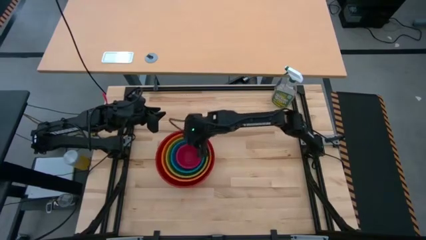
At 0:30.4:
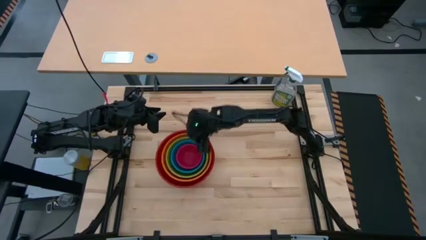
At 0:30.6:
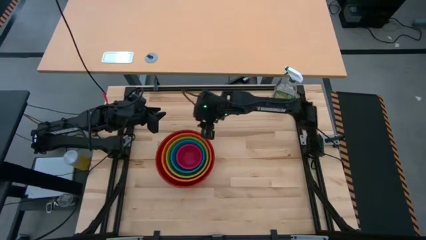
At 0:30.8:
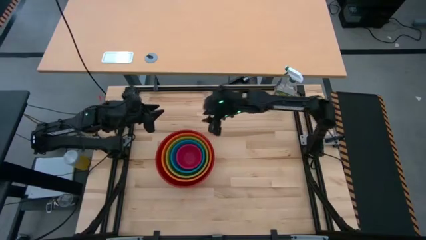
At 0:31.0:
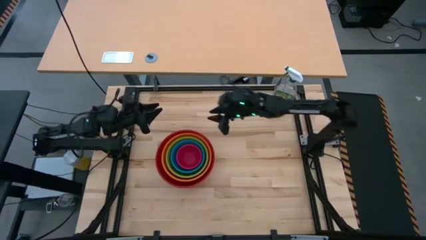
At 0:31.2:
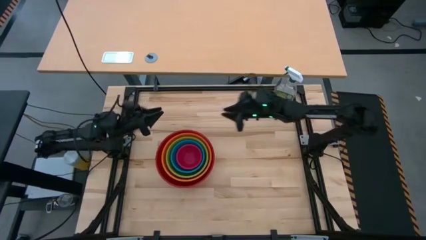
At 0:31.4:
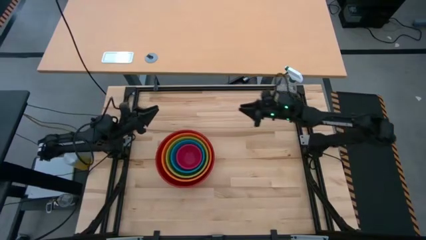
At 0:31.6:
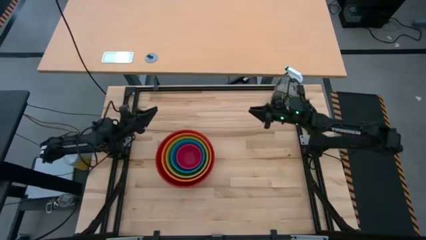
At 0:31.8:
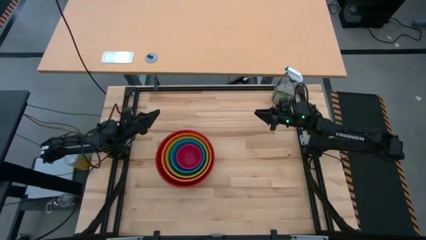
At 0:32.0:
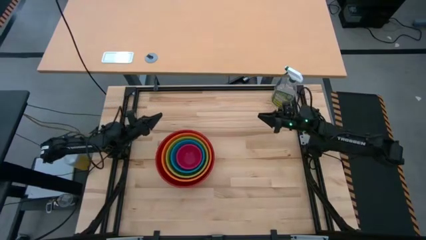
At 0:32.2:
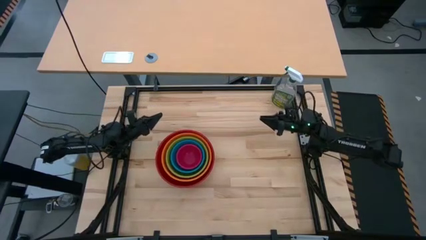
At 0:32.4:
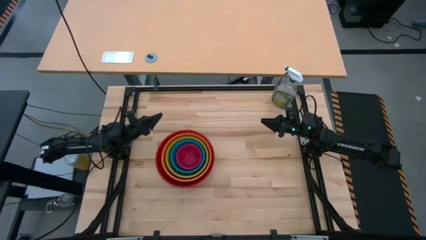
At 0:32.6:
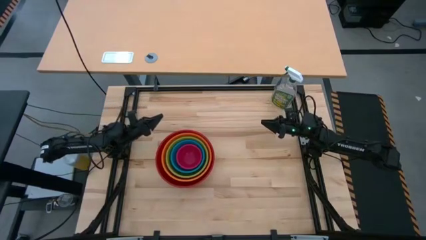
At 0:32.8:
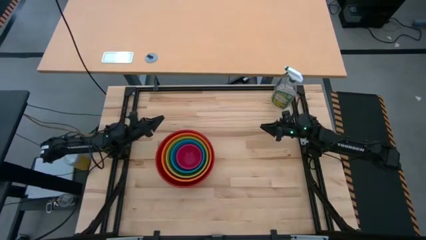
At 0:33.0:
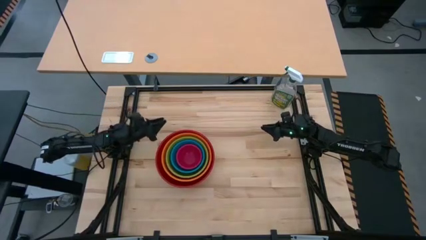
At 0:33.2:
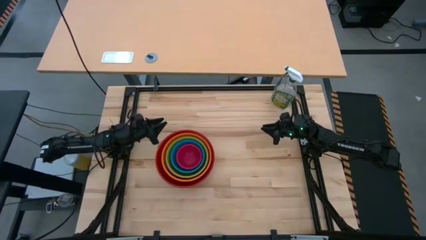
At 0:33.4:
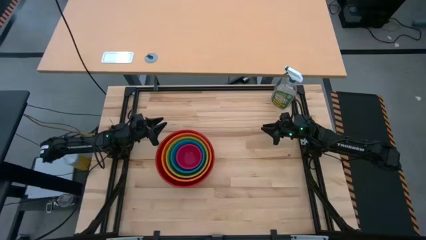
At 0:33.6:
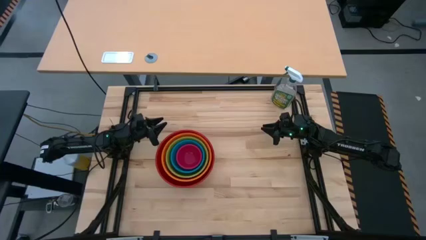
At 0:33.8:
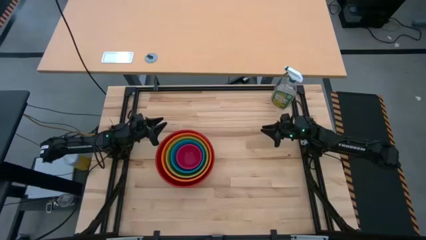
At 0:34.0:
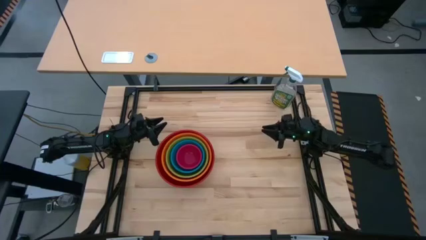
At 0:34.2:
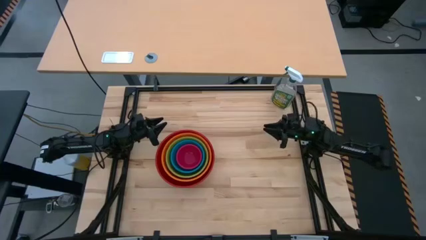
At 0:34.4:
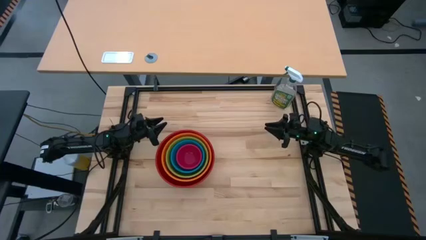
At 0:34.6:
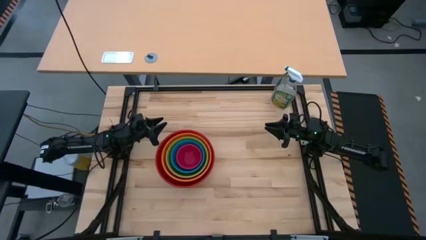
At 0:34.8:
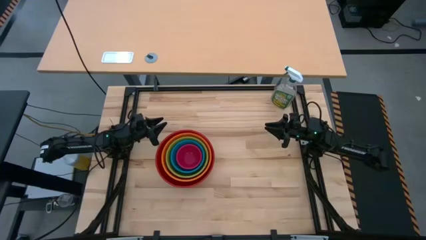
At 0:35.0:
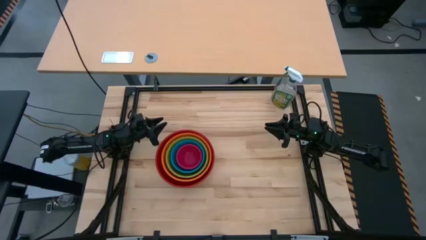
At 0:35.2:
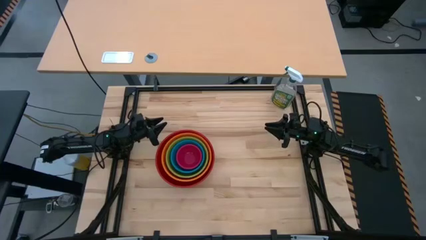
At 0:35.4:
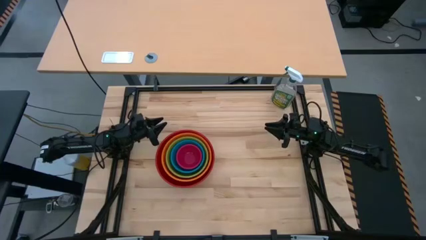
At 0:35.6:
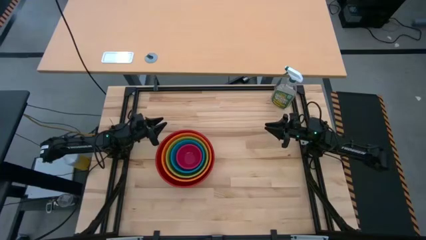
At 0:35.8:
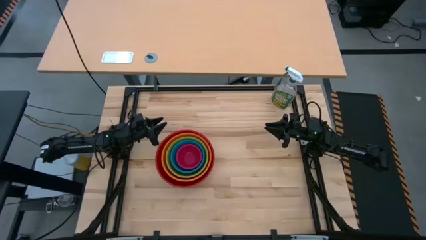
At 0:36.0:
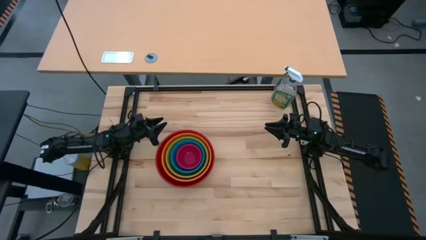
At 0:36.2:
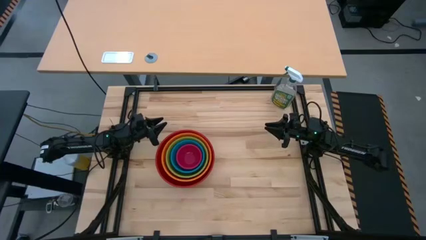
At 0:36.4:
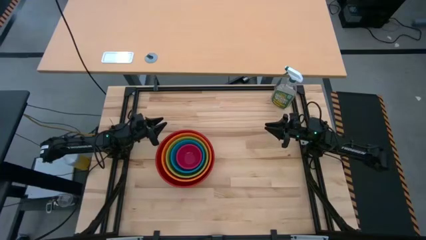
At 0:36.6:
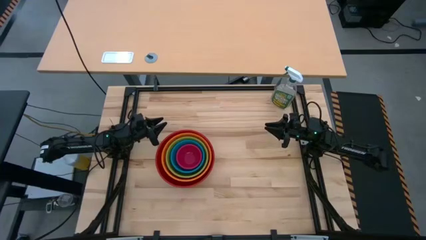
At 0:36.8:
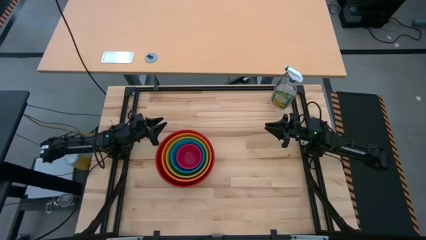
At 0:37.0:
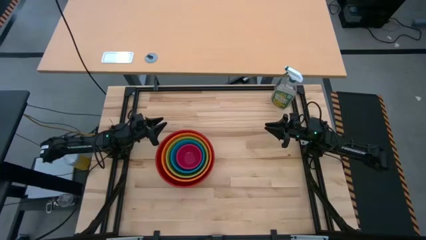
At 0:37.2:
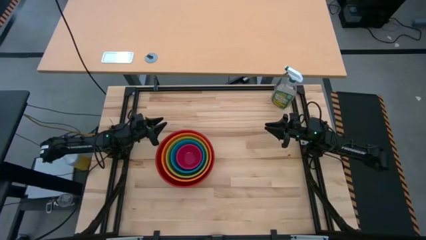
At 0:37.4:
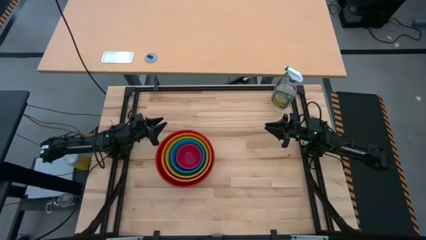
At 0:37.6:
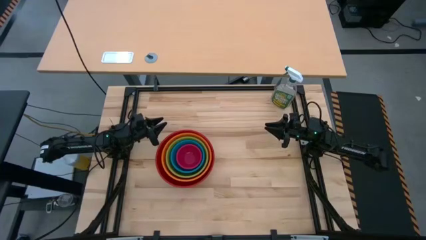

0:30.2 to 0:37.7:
Return to Home Position

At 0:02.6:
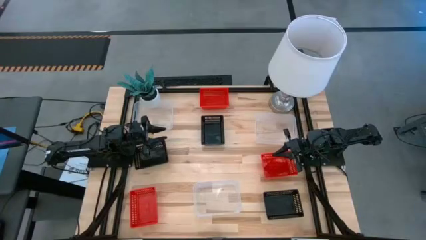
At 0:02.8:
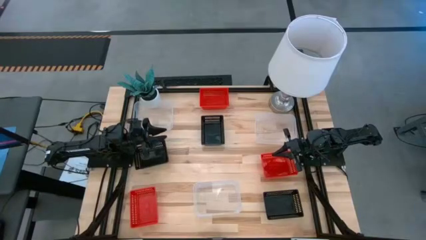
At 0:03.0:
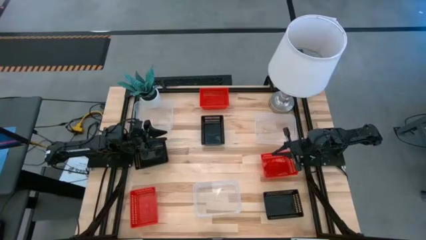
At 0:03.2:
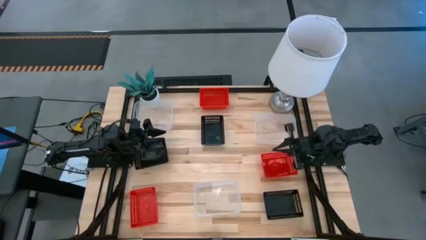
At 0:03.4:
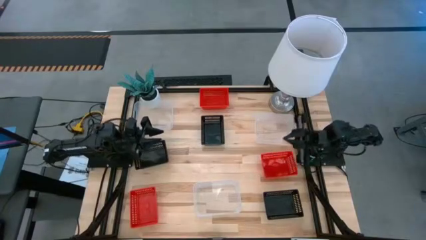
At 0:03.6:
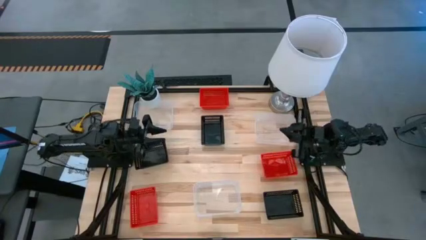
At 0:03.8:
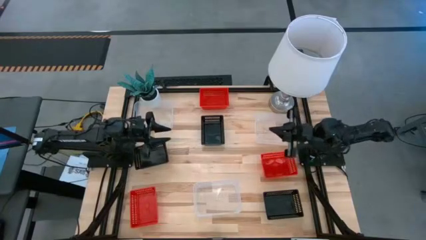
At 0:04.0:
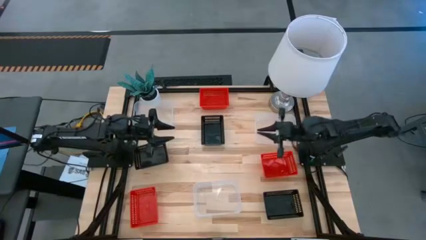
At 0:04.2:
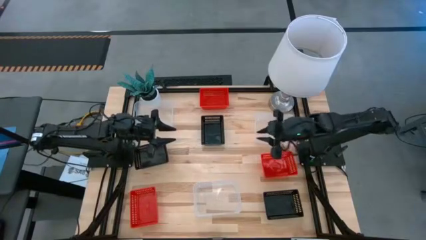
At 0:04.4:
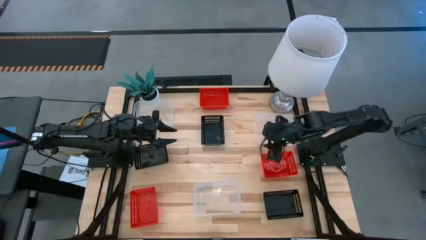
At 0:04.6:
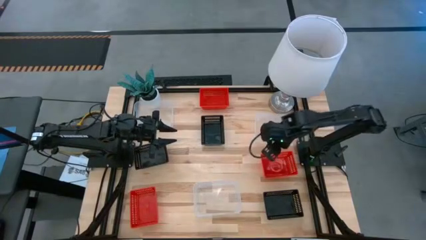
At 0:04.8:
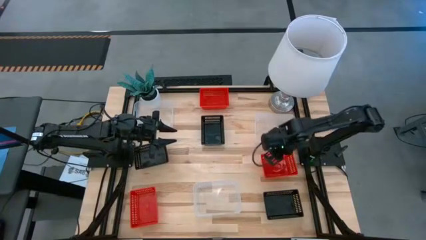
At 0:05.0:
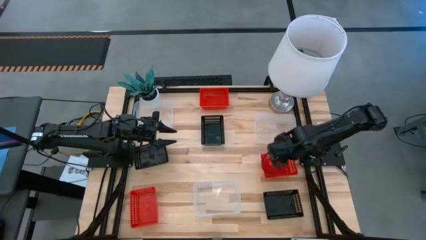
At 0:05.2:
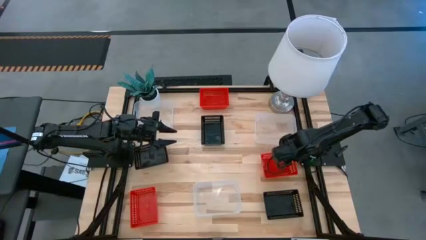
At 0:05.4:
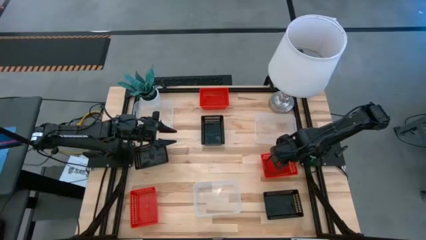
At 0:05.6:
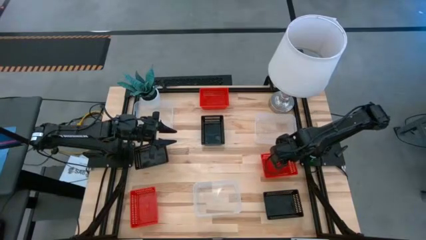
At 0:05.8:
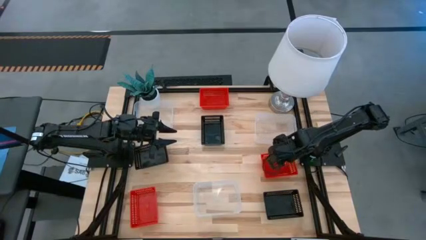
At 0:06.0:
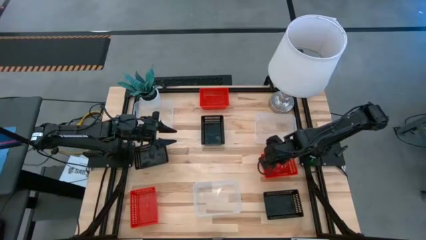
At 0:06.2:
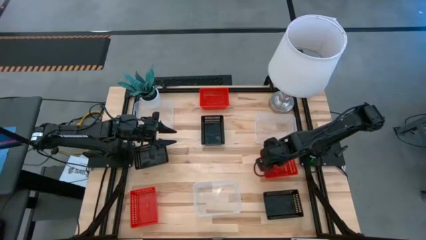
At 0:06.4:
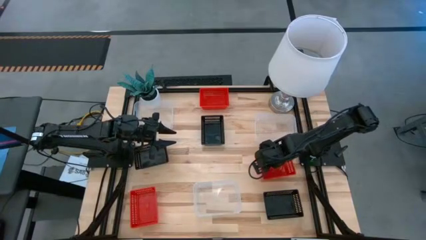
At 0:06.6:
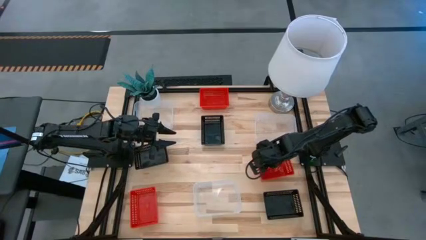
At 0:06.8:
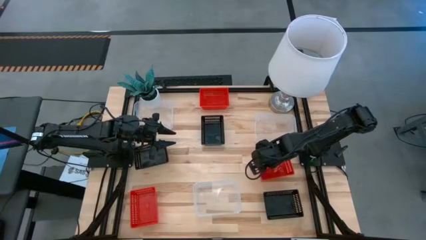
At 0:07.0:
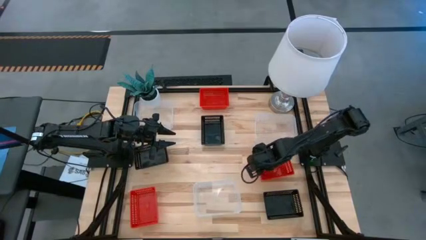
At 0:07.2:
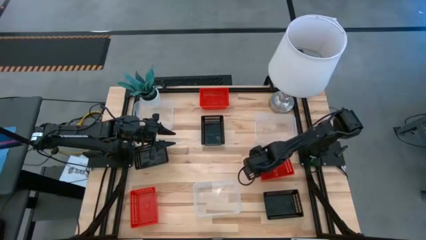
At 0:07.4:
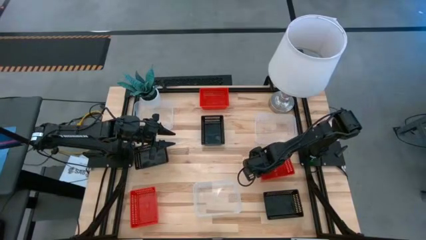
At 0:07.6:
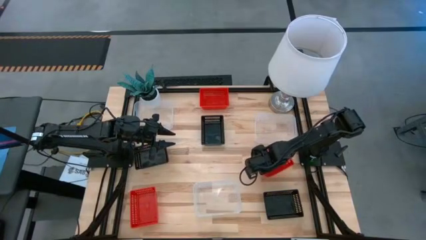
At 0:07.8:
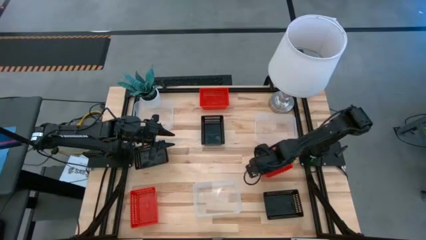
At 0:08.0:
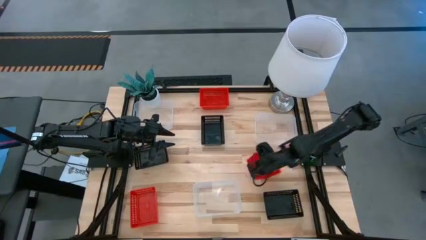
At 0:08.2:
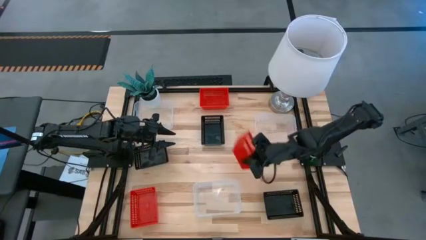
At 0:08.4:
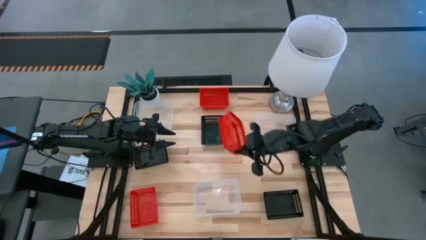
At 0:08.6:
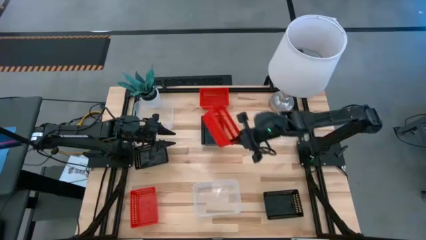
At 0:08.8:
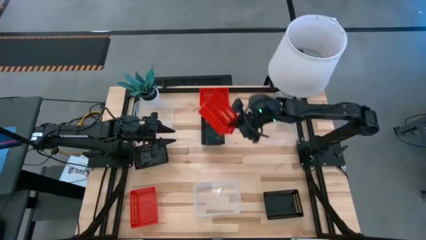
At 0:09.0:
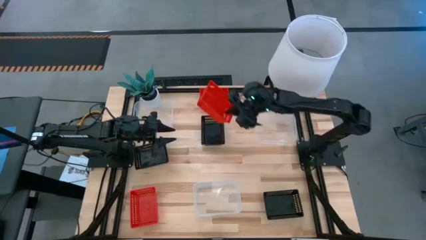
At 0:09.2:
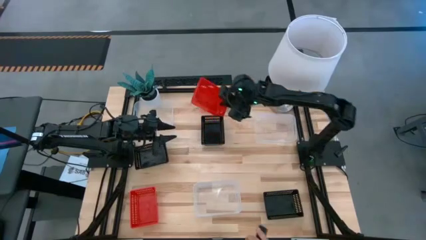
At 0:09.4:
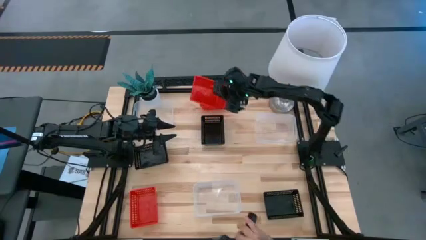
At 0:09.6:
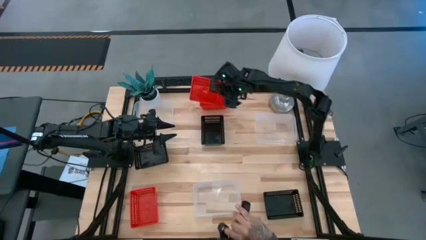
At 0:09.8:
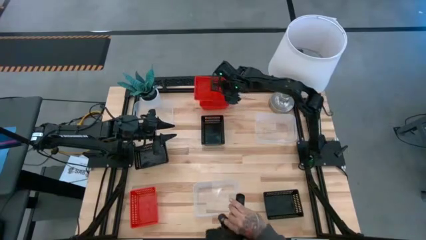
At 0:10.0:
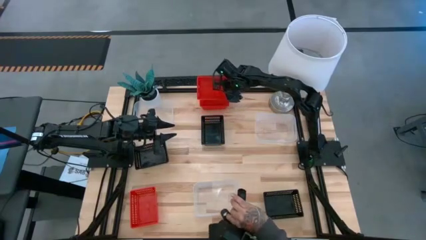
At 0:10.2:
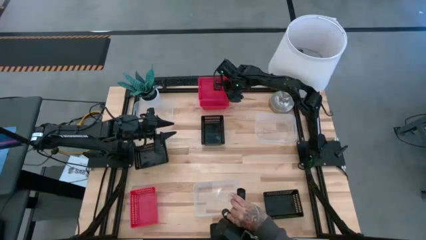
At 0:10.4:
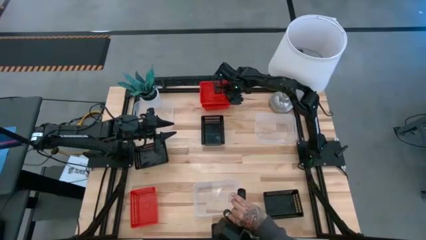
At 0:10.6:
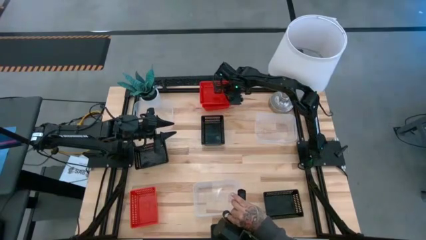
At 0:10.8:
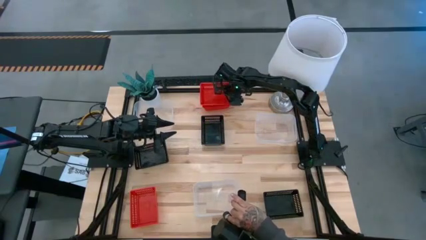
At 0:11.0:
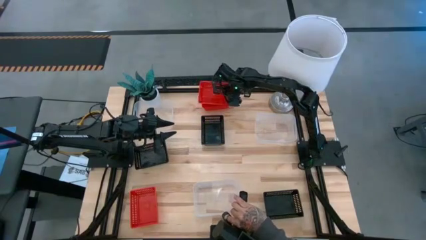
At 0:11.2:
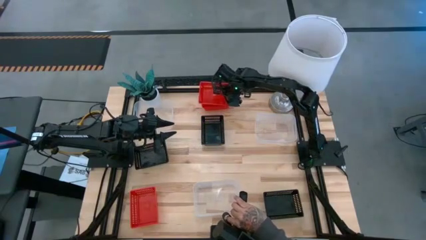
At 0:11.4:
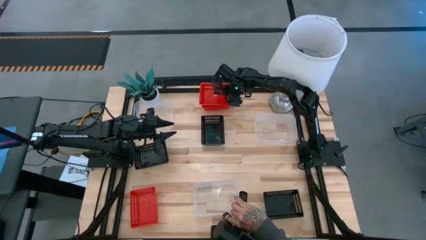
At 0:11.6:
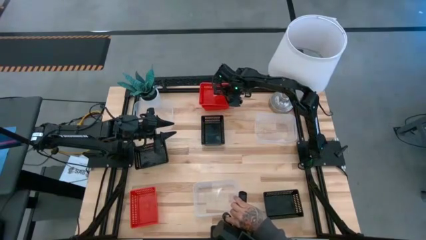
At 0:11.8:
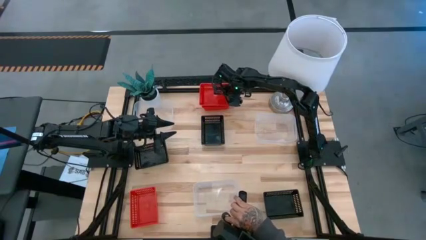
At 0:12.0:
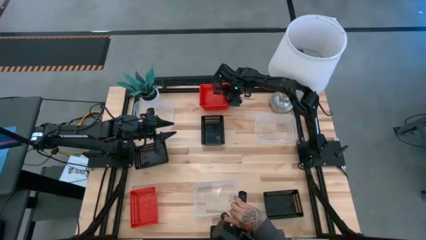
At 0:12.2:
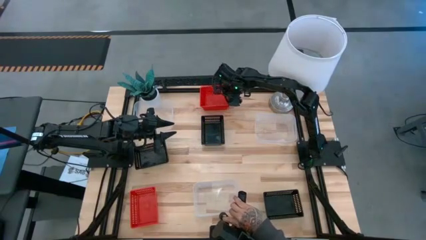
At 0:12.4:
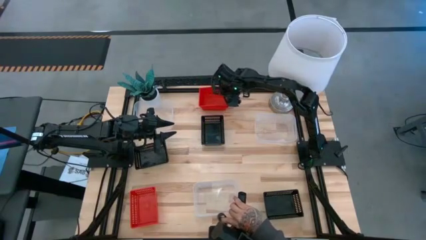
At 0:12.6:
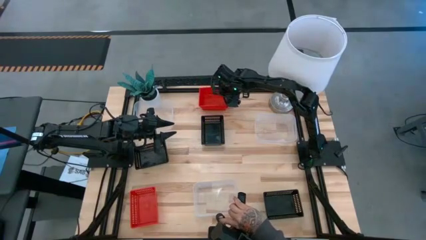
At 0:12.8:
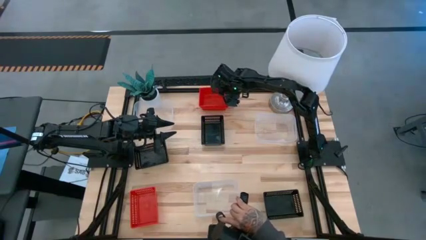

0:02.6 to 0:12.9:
Stack the middle red bin on top of the top red bin
